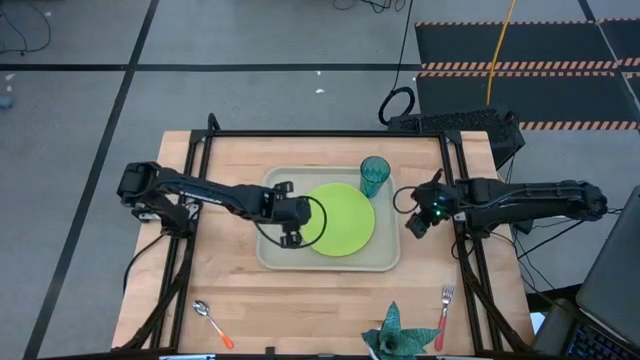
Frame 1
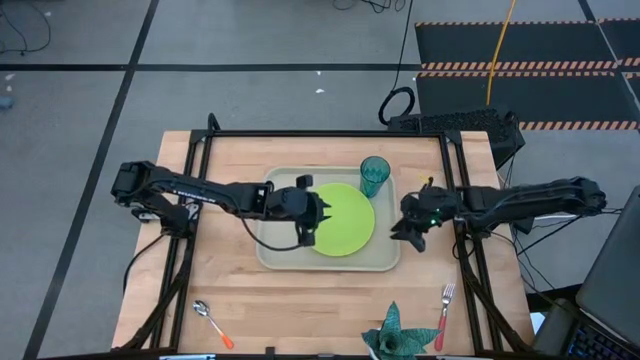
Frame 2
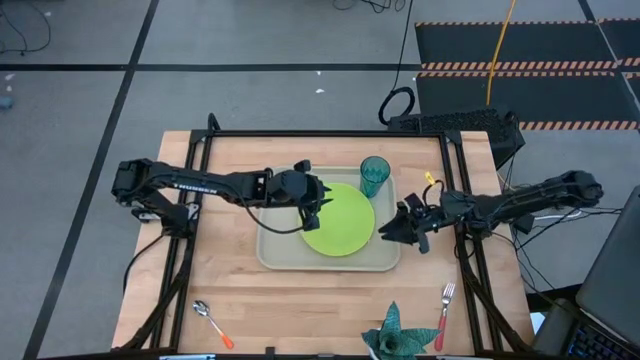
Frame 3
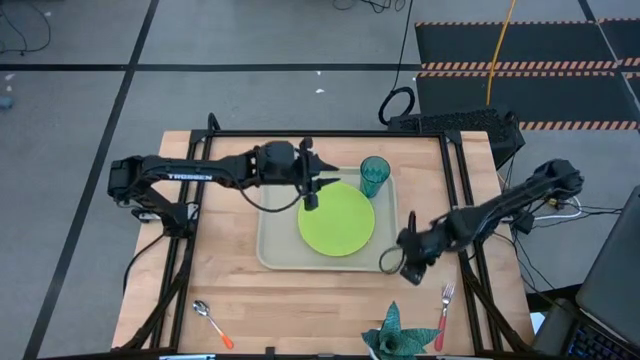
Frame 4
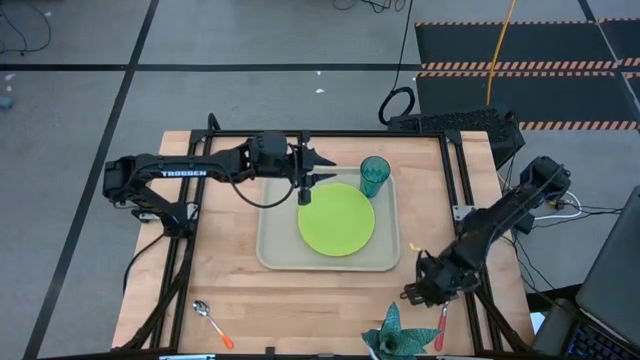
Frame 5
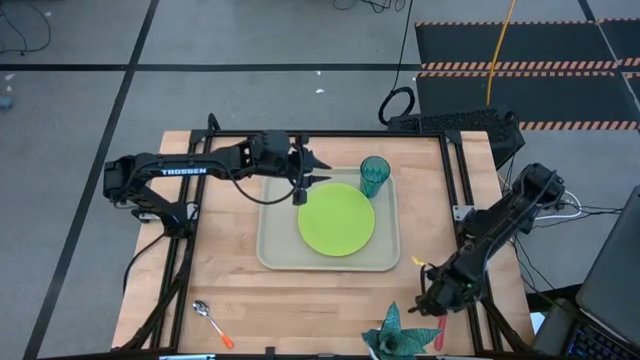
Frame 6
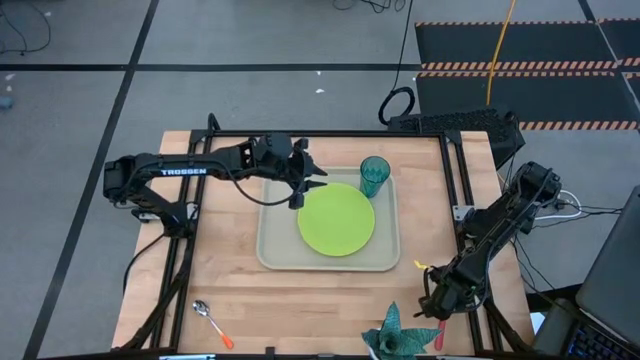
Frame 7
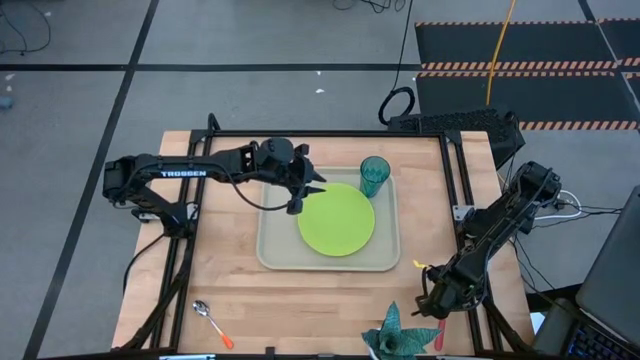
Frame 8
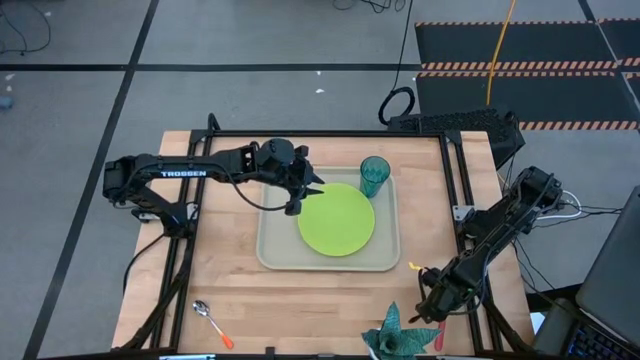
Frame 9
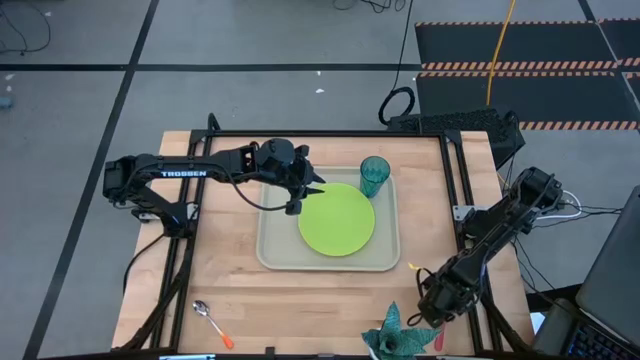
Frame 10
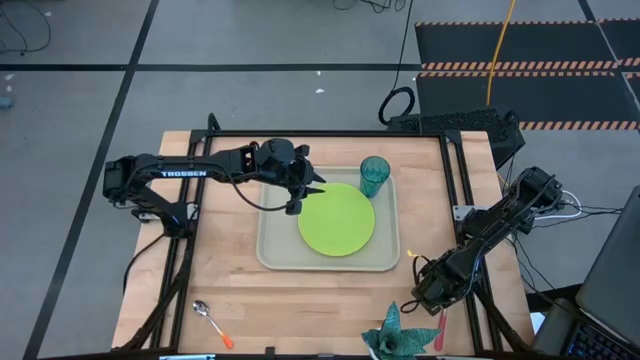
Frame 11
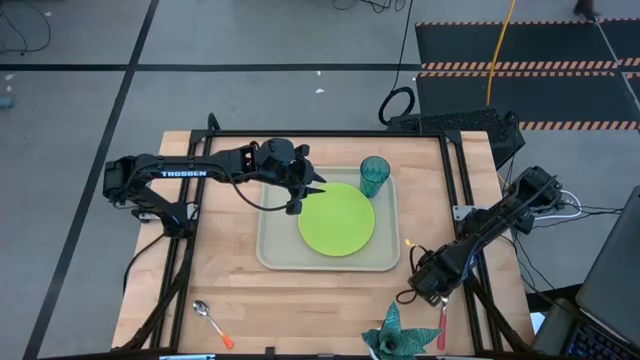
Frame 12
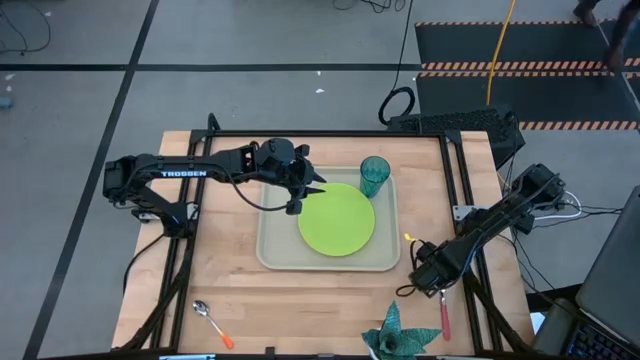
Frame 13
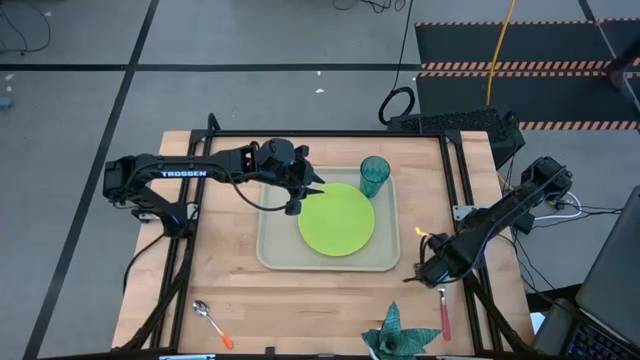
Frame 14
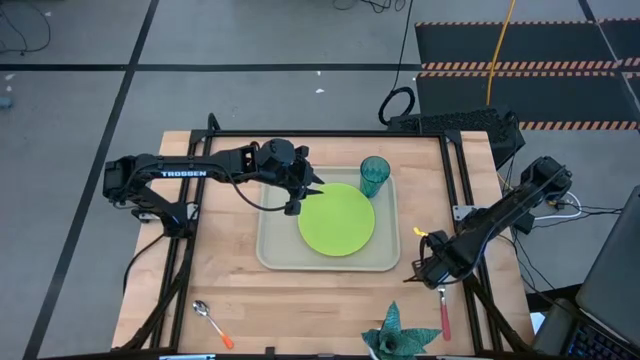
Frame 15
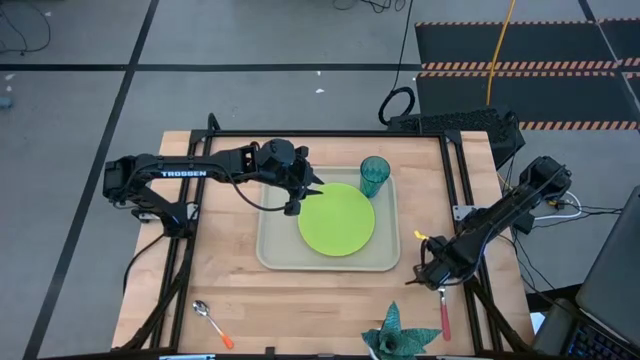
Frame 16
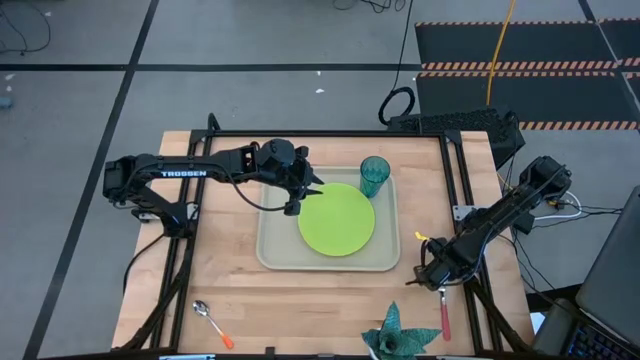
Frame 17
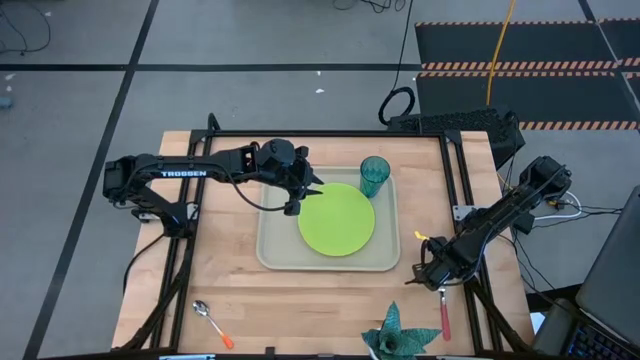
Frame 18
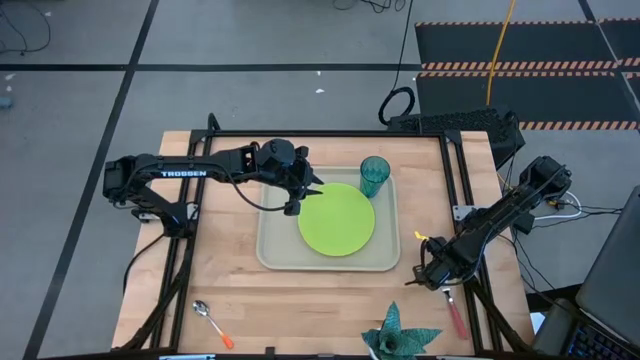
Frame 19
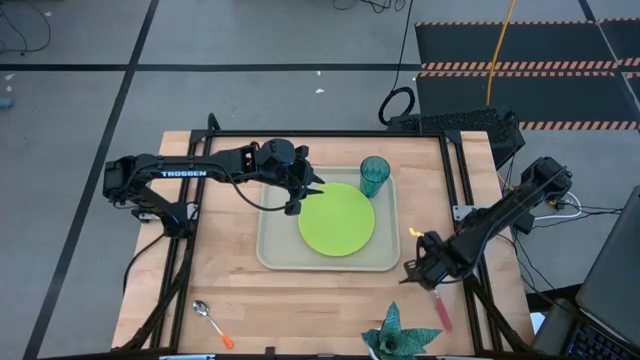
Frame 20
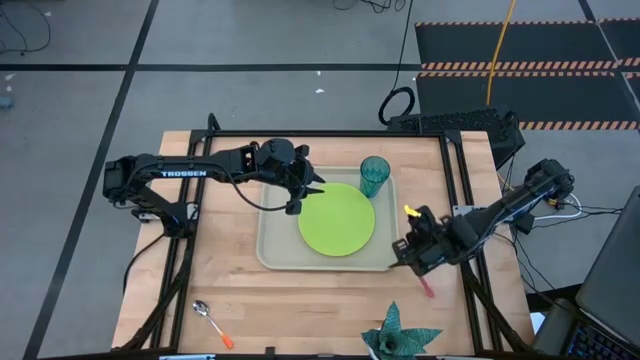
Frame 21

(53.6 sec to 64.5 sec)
Task: Pick and place plate/cup/fork/spoon on tray
Put the pink fork on the light brown serving tray to the left of the light green plate

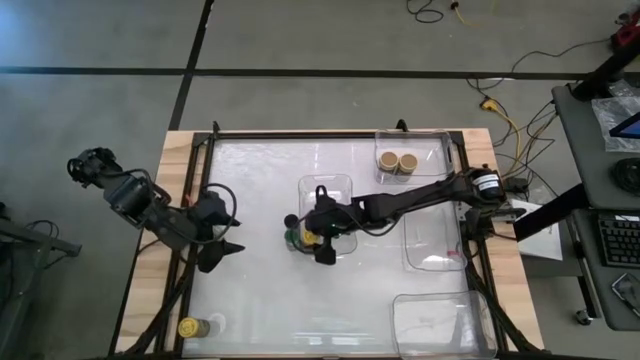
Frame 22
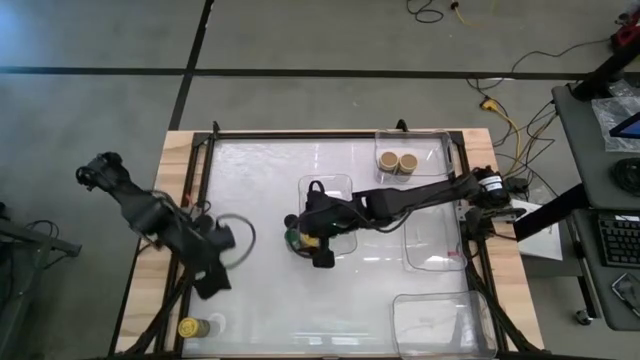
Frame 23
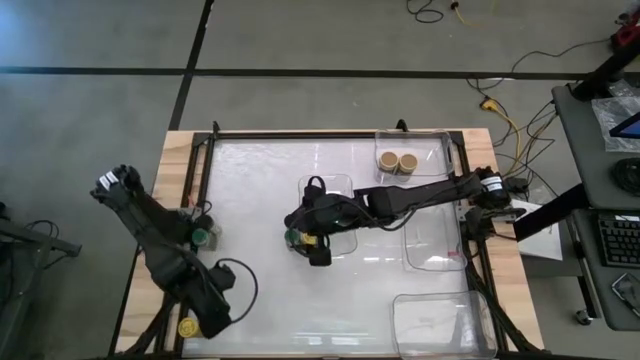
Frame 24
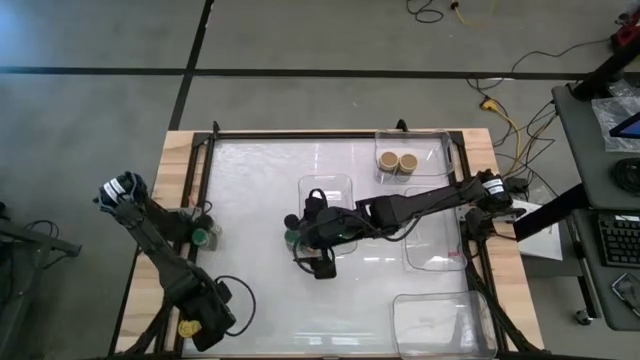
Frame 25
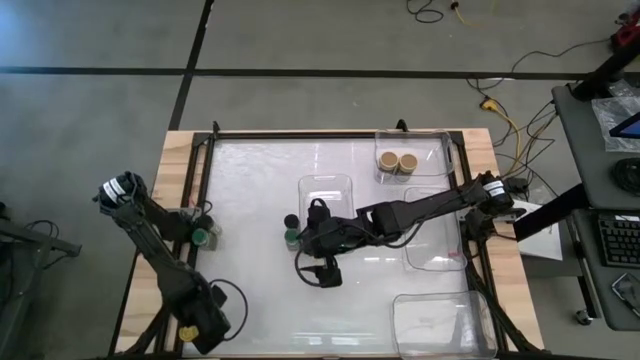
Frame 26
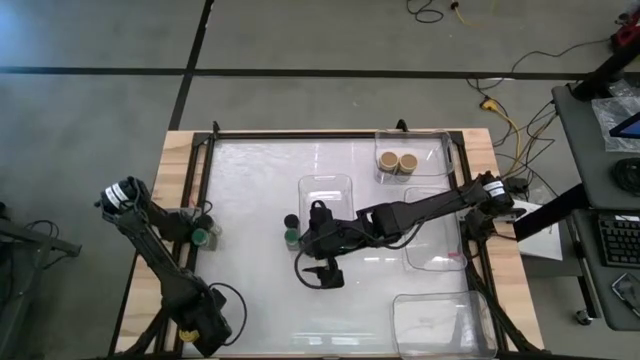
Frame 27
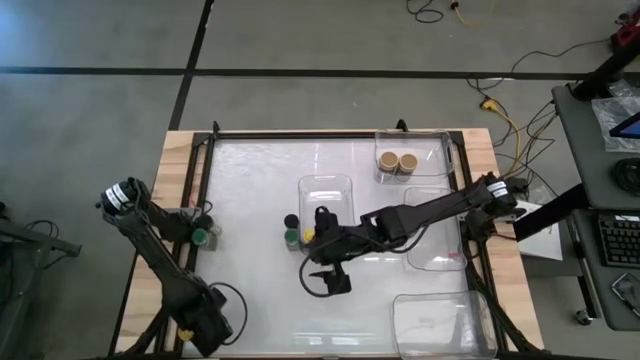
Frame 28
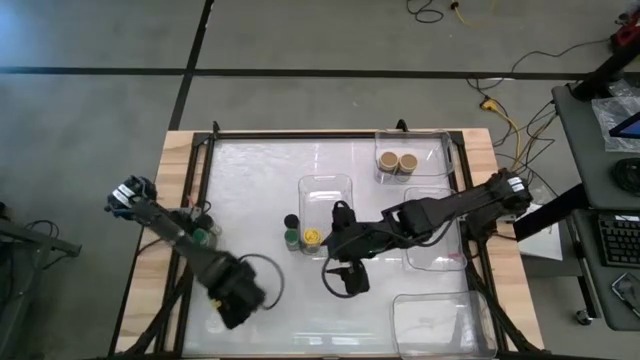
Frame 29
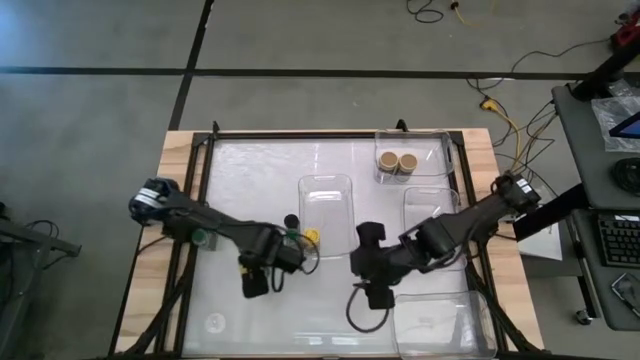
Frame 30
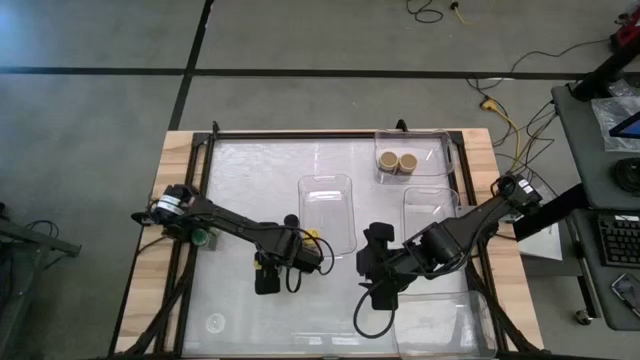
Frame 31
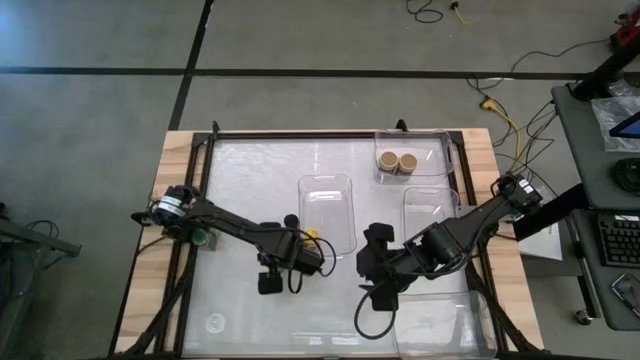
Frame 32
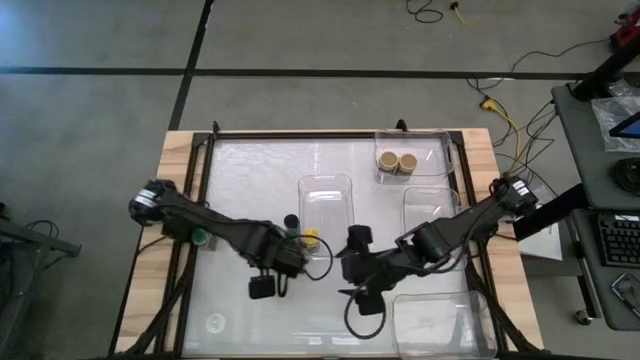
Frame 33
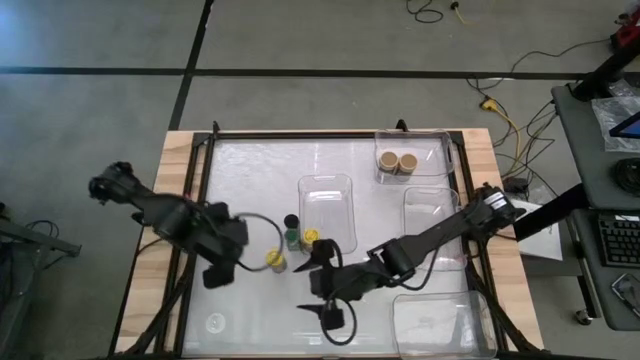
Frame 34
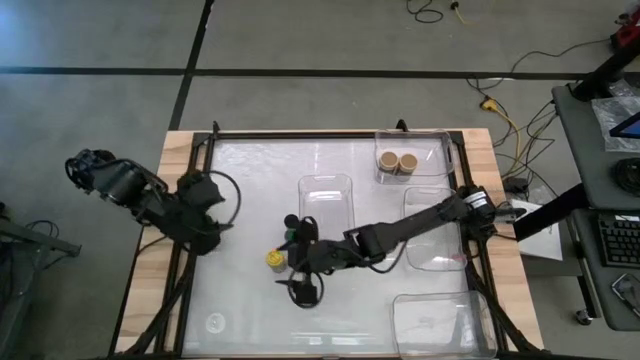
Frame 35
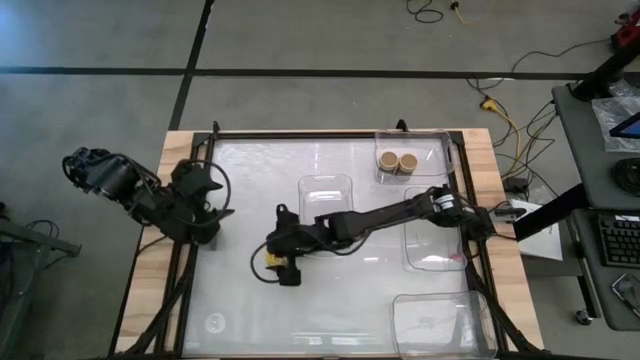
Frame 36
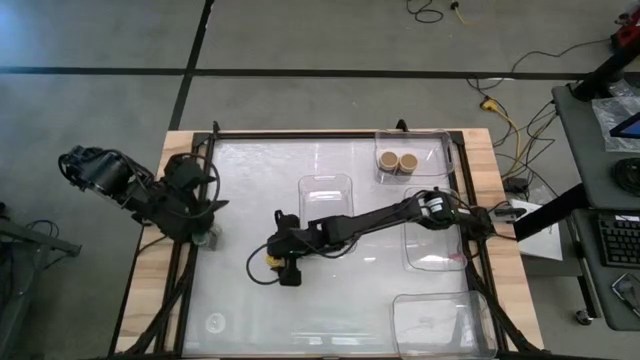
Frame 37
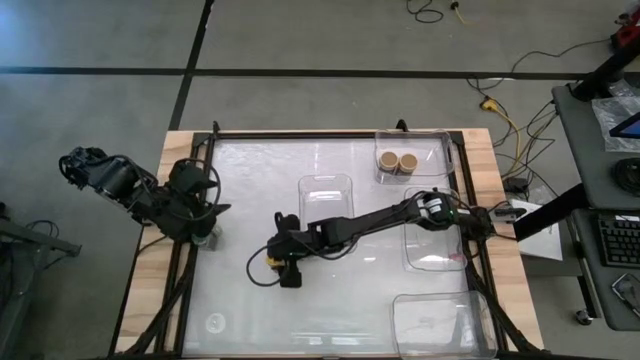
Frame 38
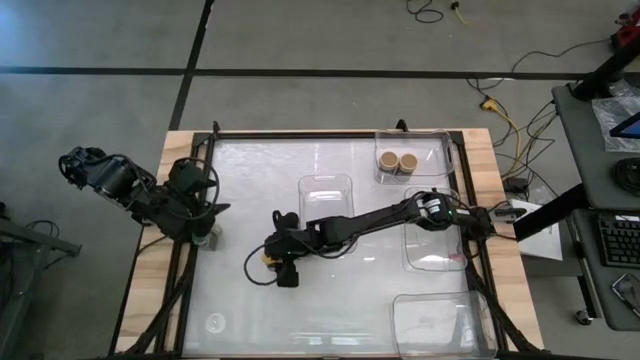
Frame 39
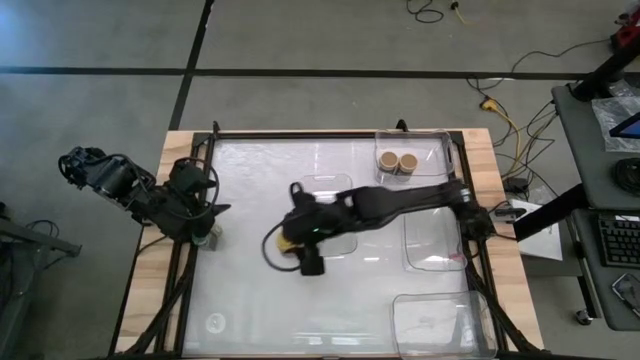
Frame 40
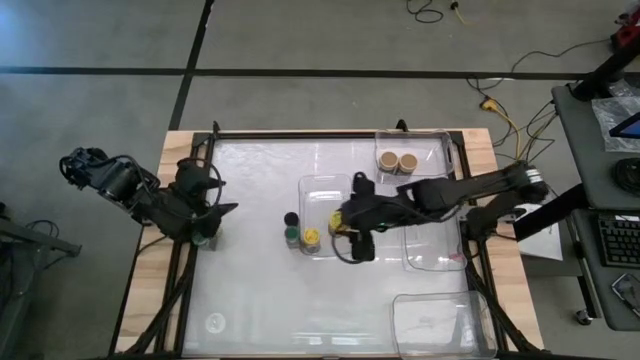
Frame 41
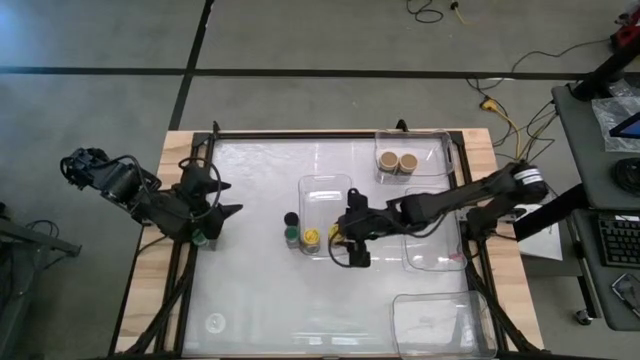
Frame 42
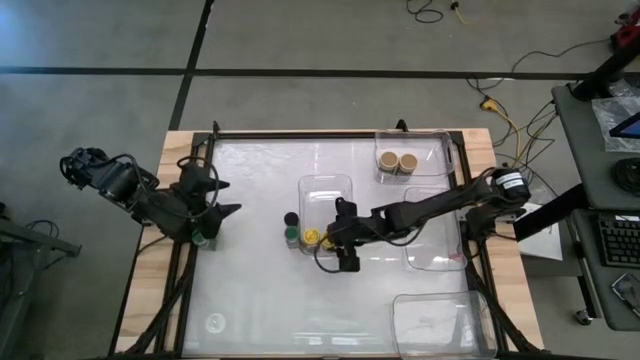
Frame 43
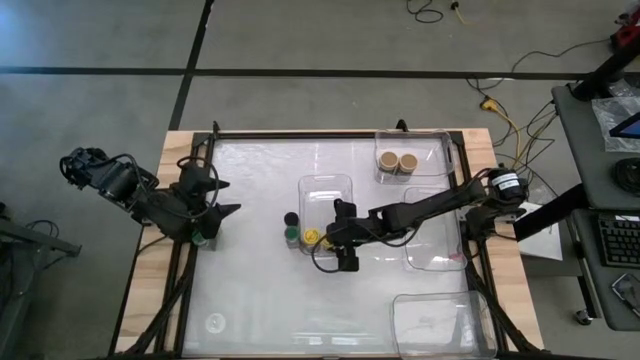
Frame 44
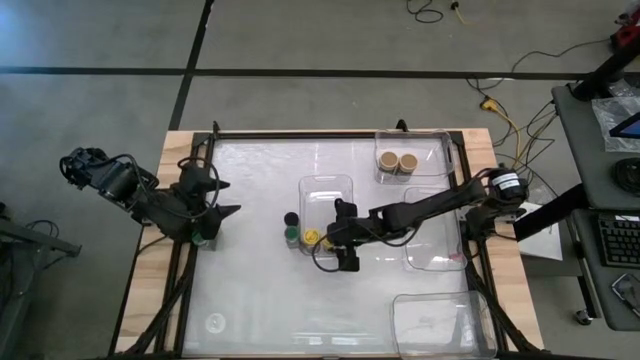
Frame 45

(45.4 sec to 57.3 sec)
Task: Sort spices by type
Put the yellow seasoning bottle into the middle left transparent bin
